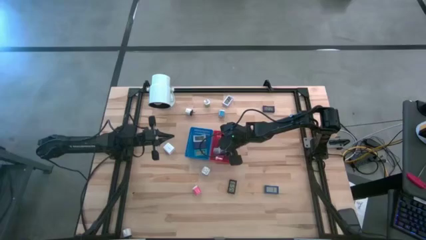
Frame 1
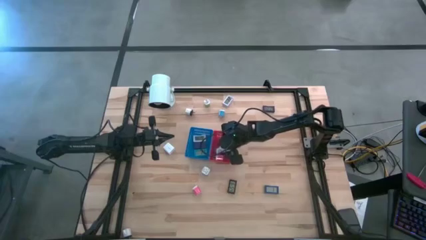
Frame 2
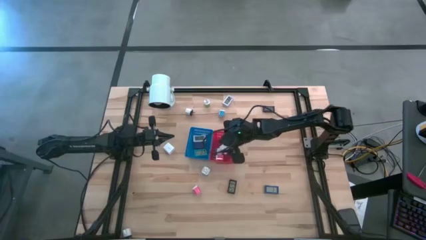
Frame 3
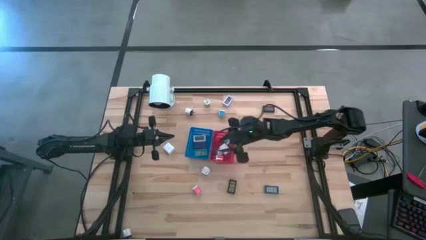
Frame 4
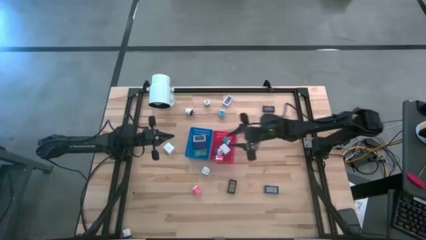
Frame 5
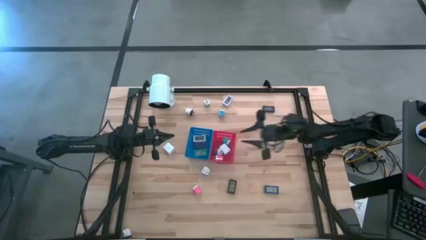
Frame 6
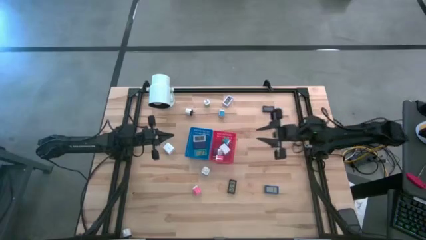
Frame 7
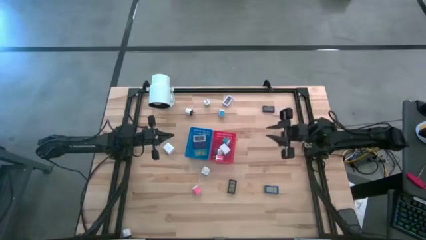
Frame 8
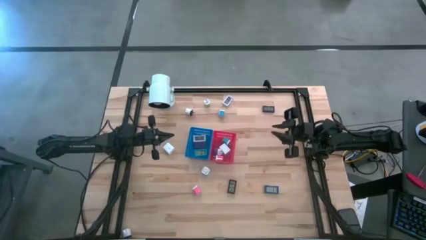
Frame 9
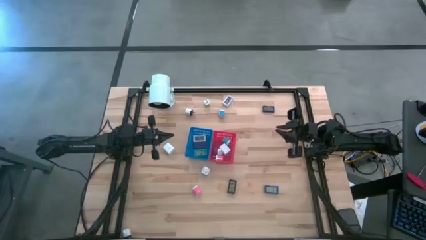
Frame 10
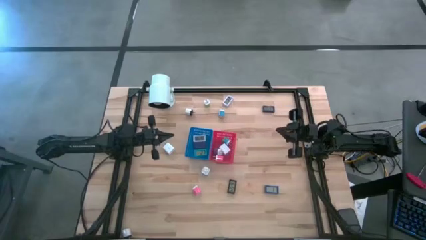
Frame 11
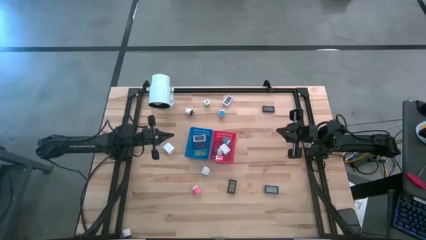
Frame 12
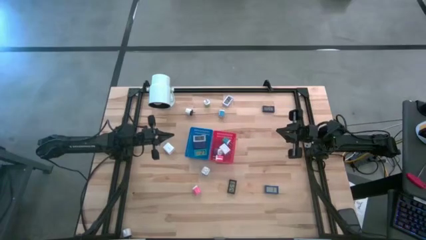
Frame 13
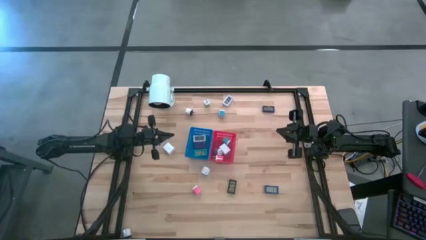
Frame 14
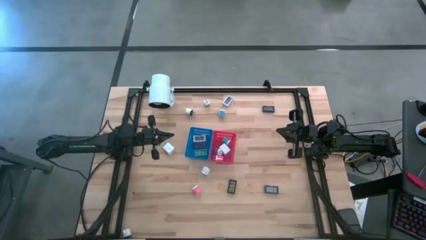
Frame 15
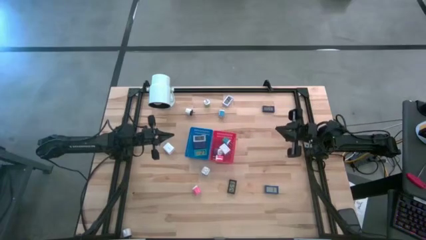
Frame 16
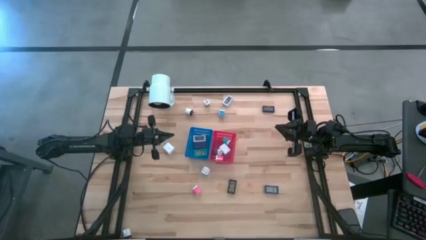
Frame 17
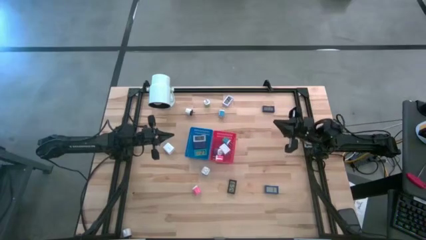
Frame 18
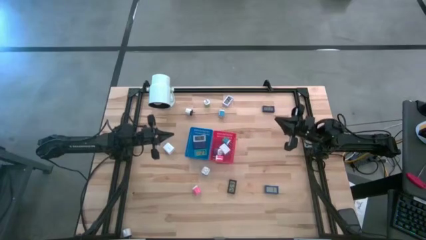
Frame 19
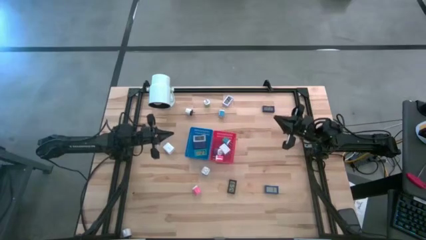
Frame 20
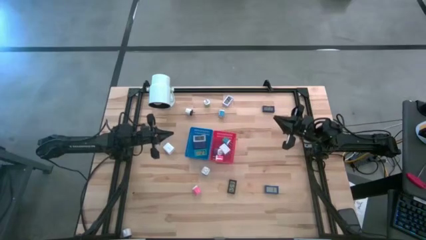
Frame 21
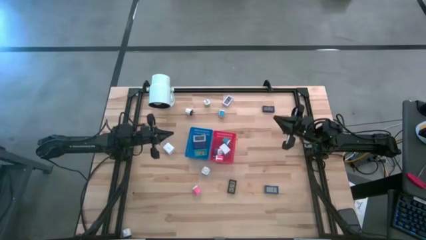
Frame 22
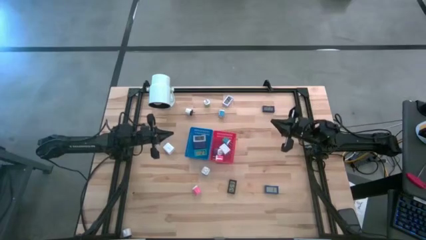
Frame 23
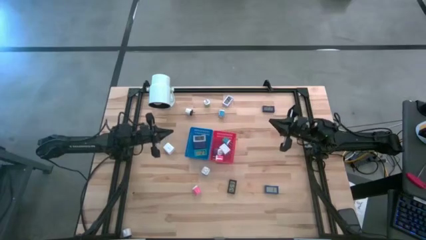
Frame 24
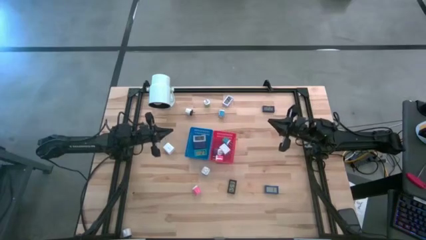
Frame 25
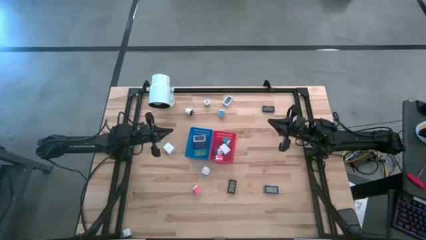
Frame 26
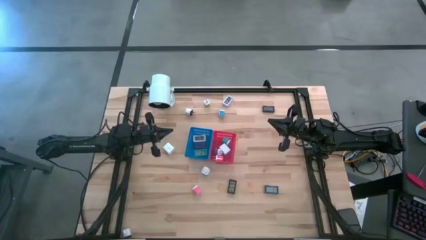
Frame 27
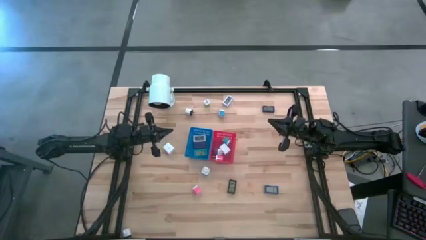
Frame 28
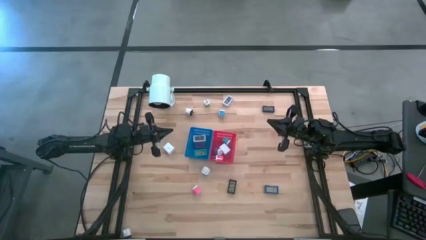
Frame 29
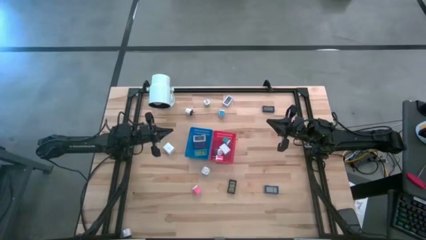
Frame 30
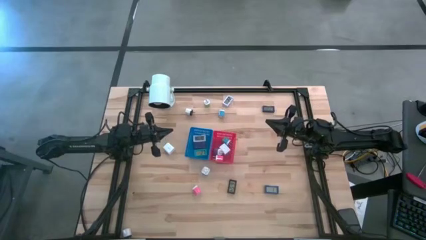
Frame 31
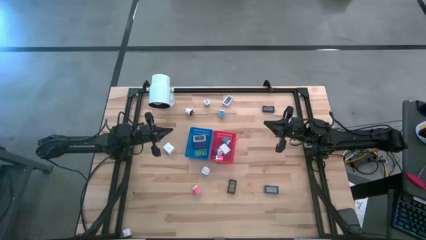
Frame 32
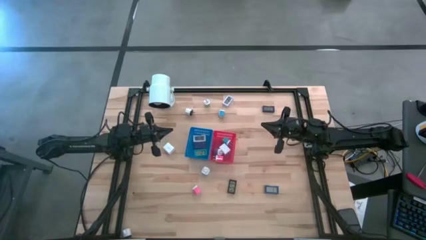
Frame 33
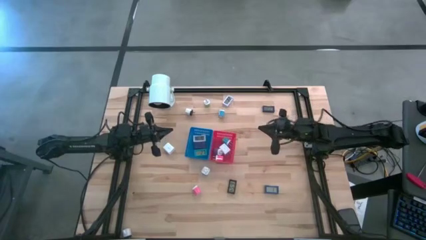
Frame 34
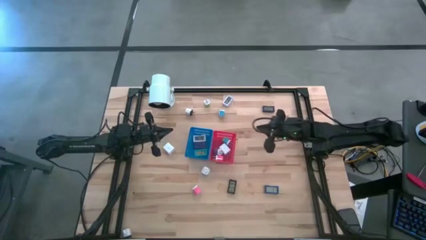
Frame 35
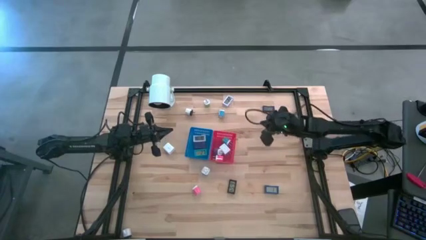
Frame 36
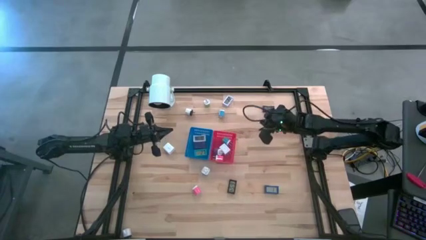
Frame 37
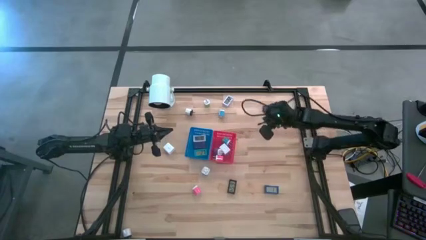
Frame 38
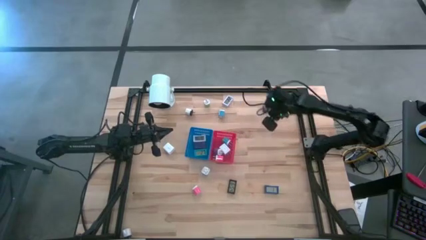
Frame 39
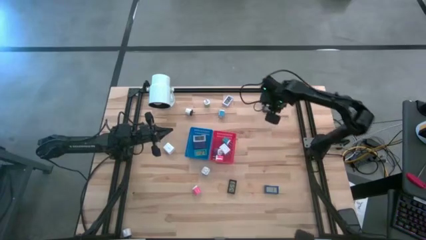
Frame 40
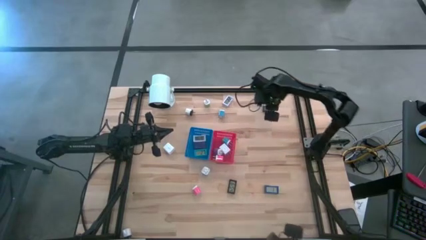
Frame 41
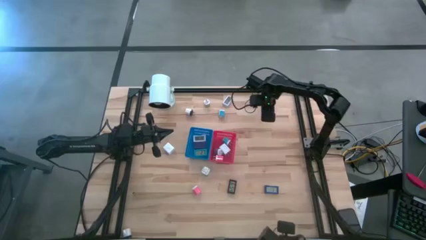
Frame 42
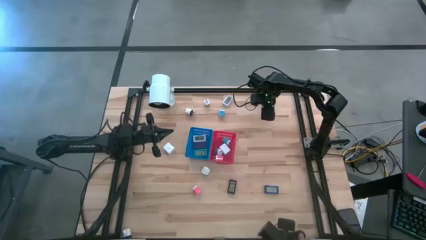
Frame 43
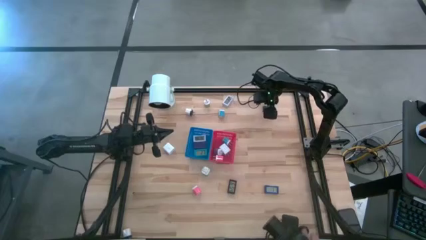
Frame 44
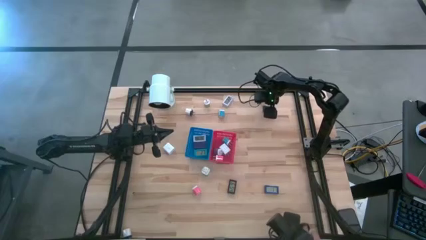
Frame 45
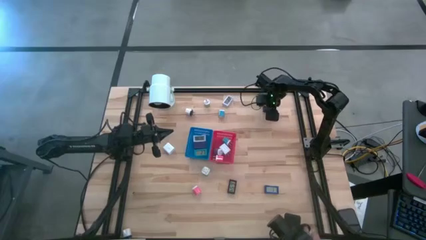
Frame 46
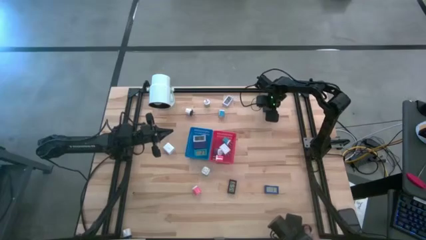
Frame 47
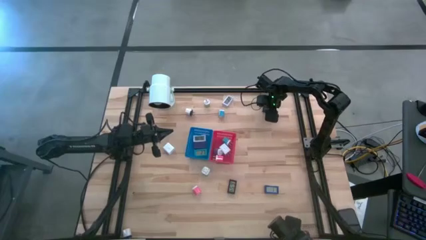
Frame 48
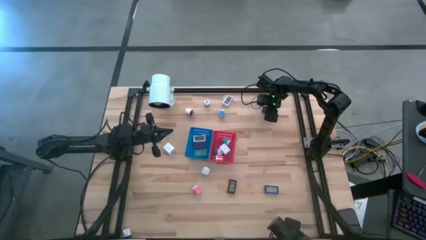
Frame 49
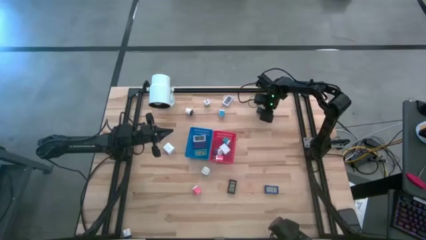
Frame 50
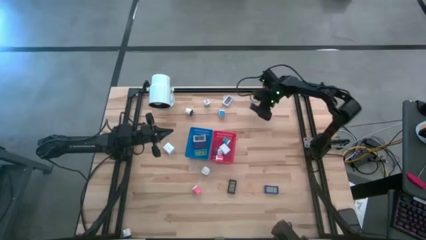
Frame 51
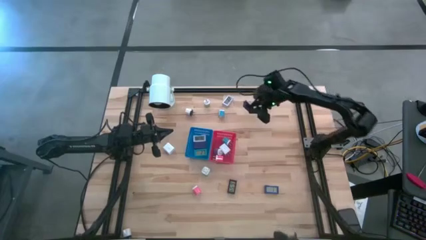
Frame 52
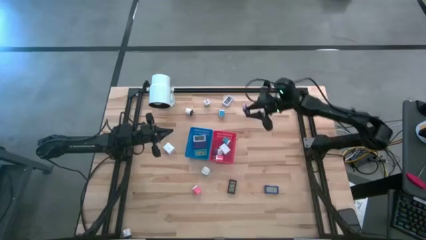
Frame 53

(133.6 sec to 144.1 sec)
Task: Pick & Place Office items
Put the dark blue digital clock into the blue bin

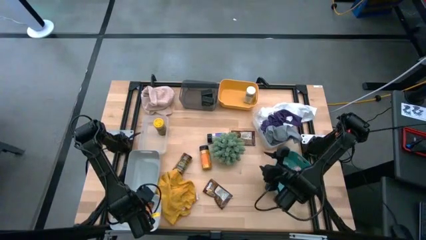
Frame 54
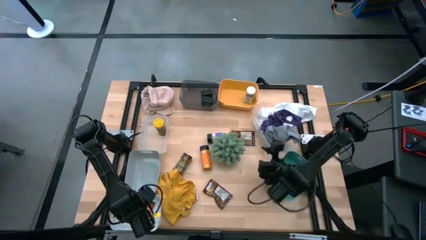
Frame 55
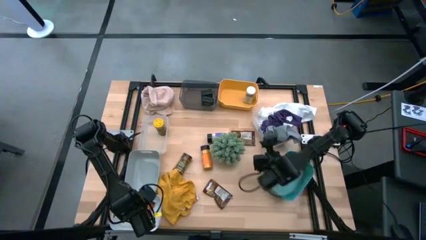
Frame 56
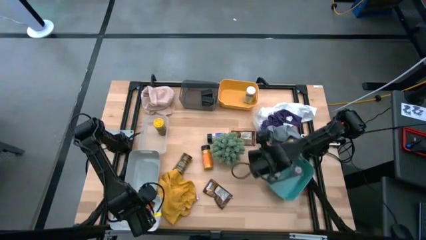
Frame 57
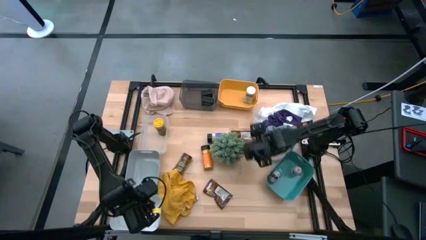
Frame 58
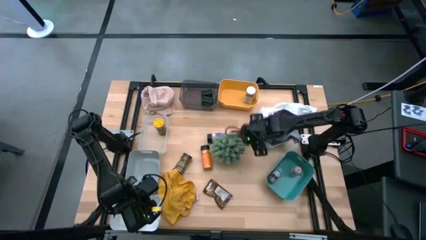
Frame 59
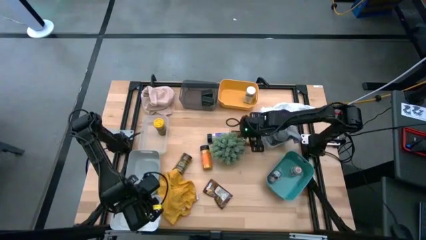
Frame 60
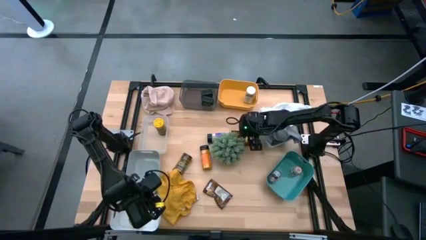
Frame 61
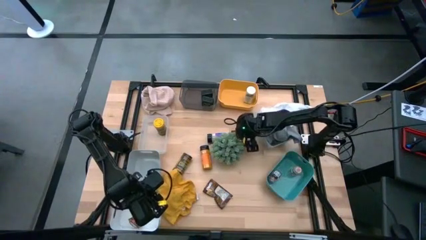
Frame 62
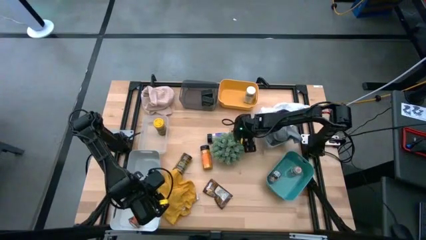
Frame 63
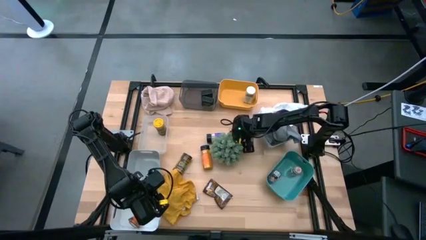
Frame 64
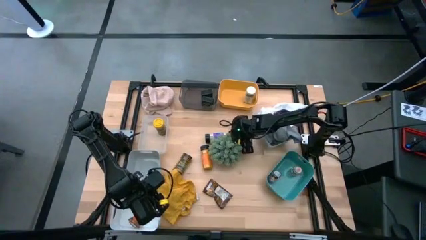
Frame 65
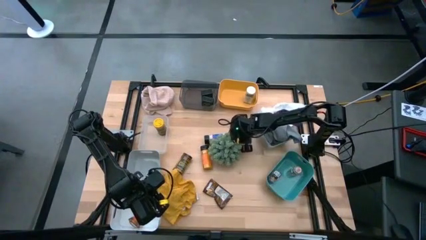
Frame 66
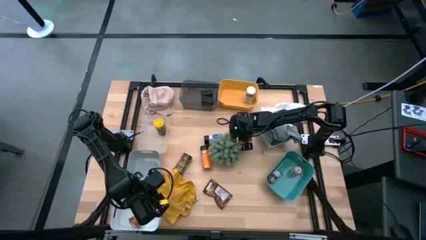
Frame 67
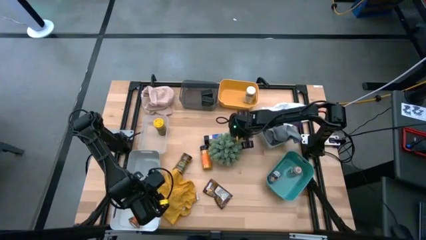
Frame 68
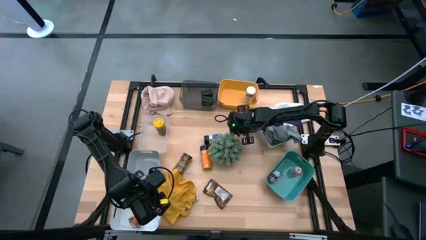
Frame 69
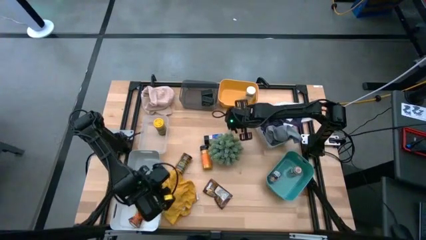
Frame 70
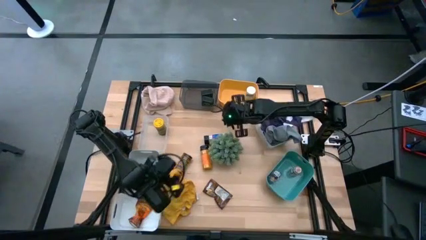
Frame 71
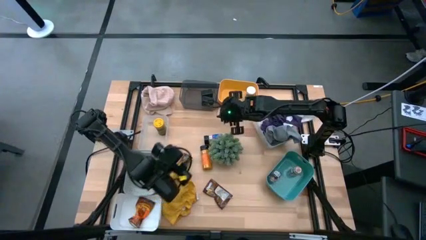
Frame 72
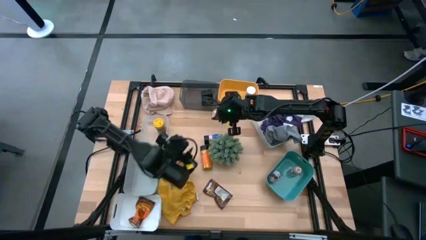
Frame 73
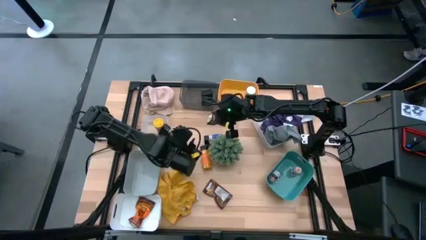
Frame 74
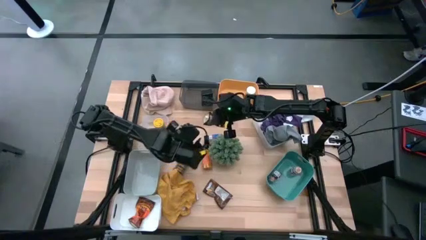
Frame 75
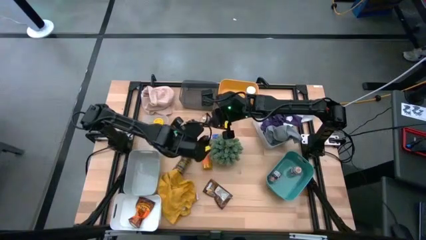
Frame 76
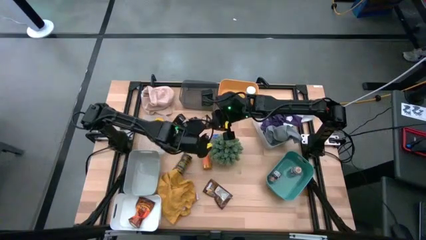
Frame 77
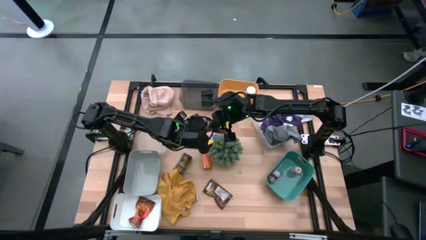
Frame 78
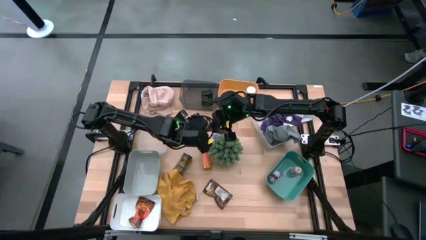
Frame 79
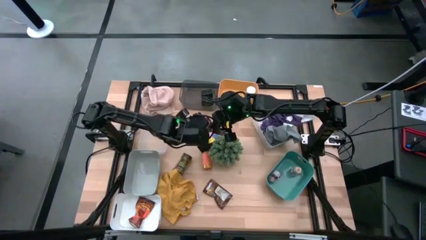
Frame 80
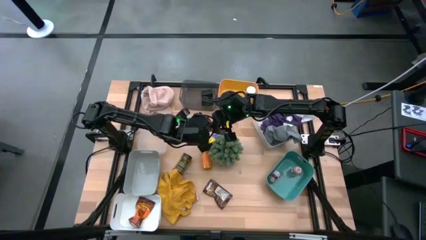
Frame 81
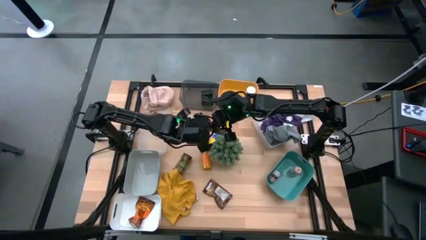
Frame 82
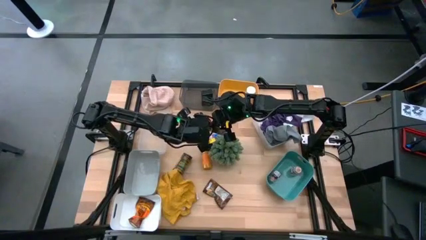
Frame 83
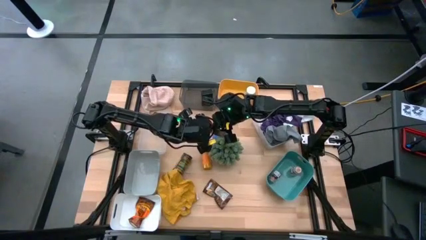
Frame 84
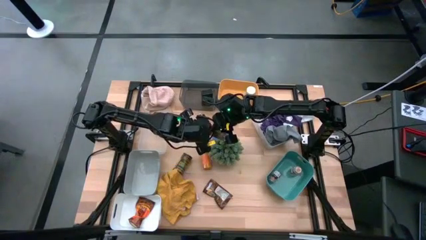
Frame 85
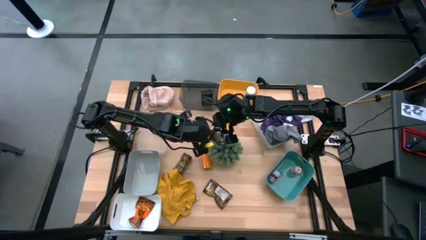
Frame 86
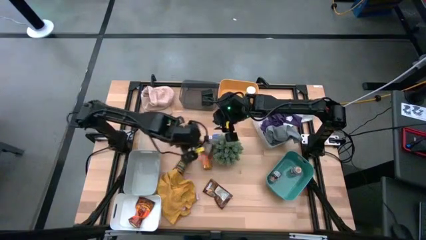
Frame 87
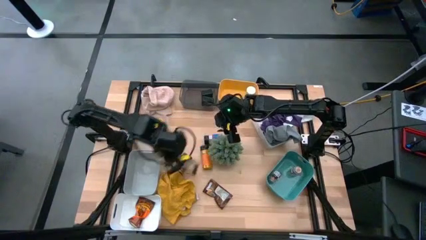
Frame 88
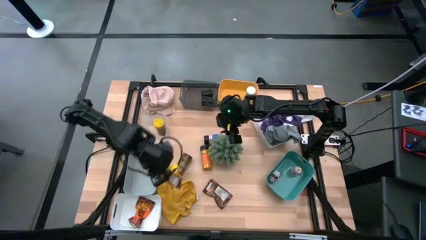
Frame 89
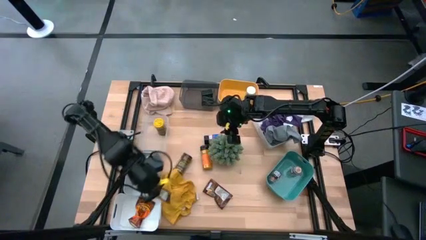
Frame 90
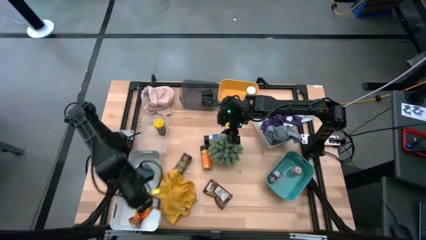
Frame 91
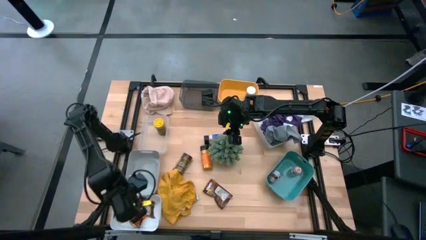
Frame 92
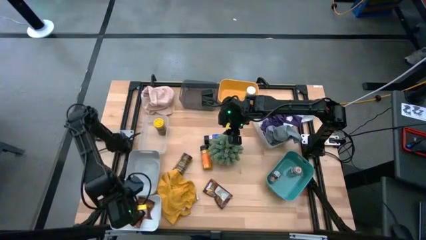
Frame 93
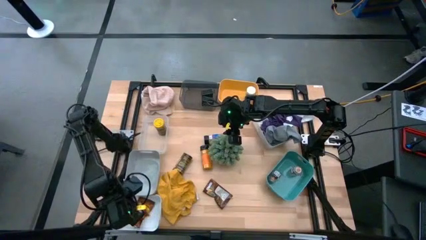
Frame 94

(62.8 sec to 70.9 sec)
Task: Sort spices by type
Put the orange spice pack into the bottom white bin
